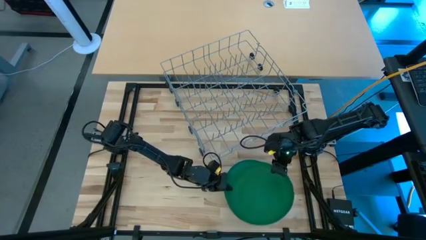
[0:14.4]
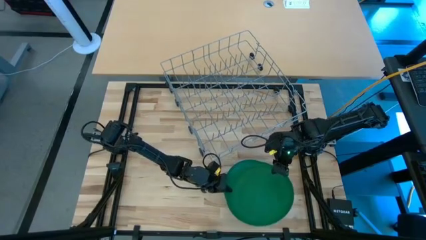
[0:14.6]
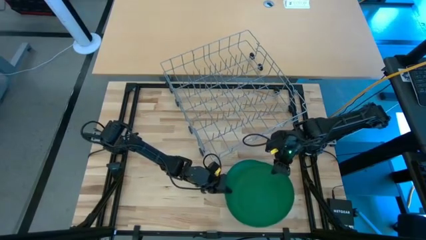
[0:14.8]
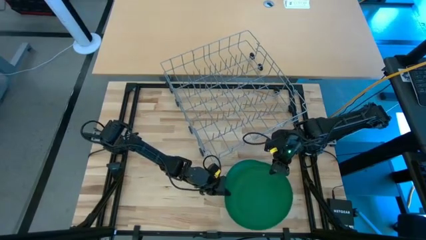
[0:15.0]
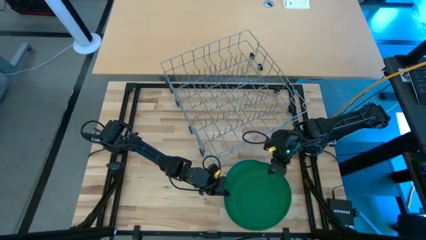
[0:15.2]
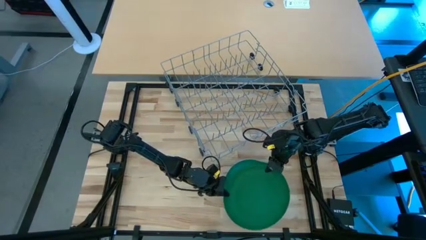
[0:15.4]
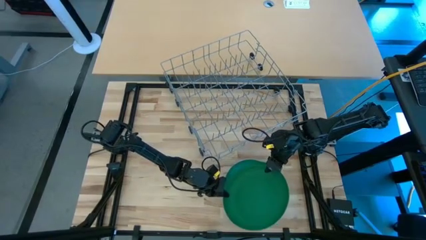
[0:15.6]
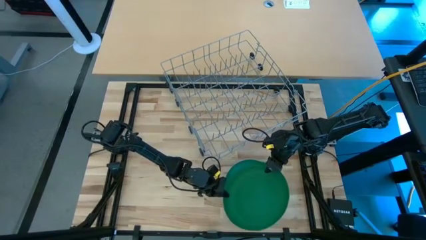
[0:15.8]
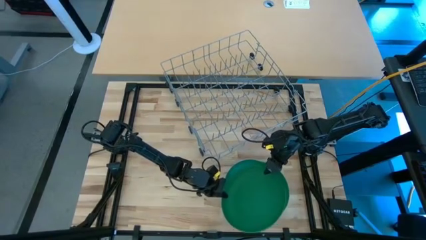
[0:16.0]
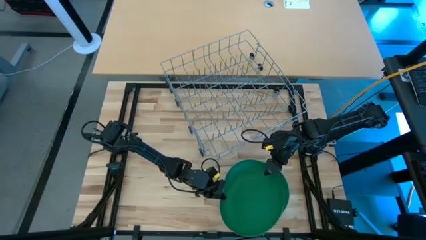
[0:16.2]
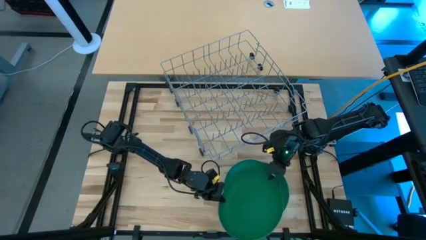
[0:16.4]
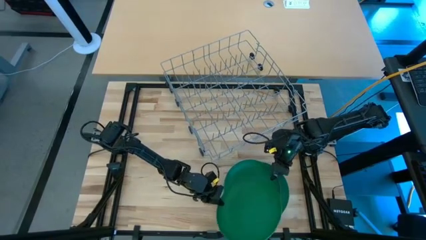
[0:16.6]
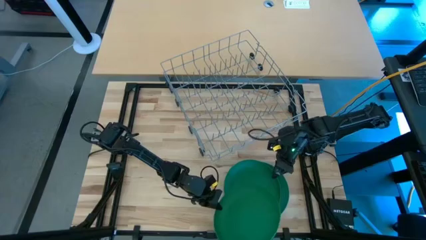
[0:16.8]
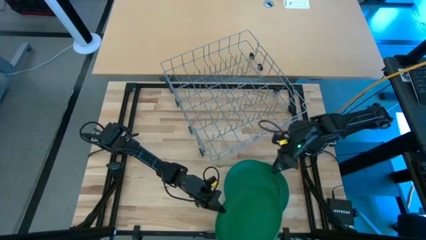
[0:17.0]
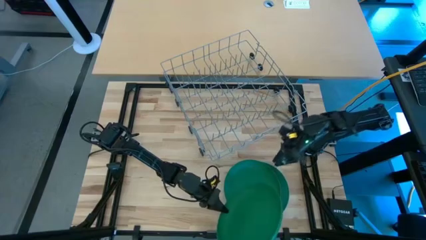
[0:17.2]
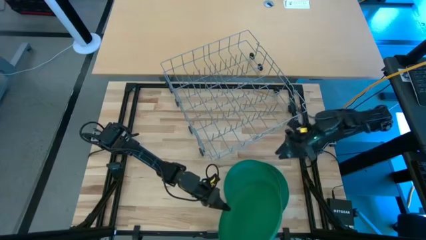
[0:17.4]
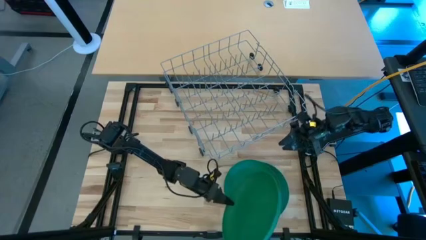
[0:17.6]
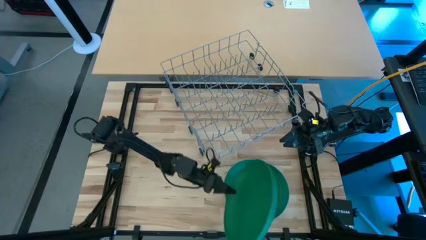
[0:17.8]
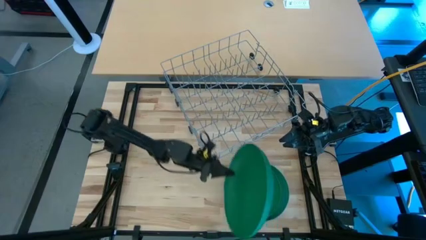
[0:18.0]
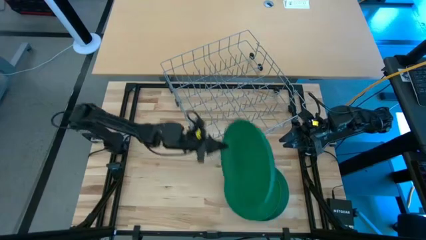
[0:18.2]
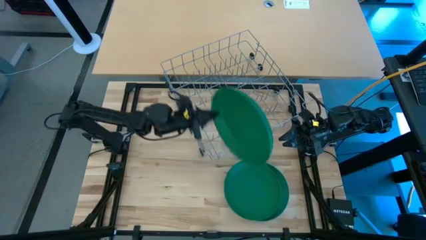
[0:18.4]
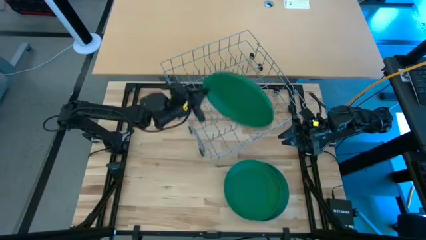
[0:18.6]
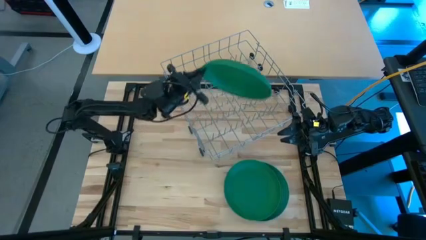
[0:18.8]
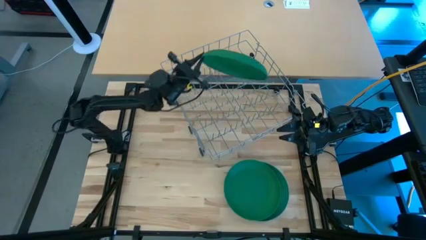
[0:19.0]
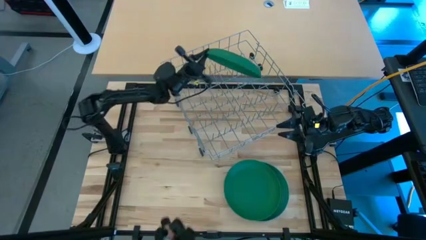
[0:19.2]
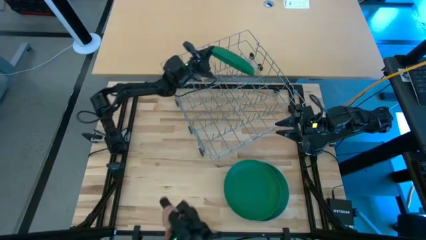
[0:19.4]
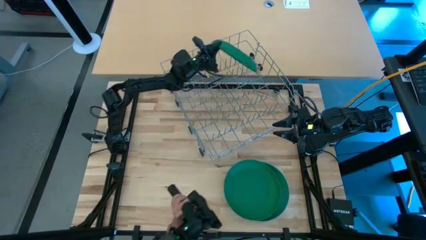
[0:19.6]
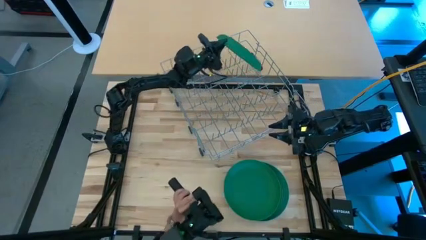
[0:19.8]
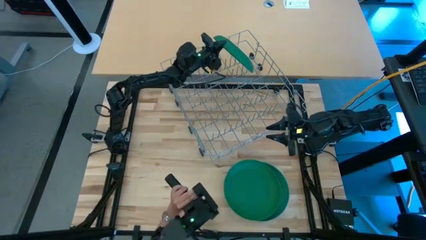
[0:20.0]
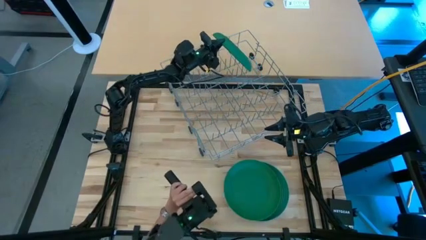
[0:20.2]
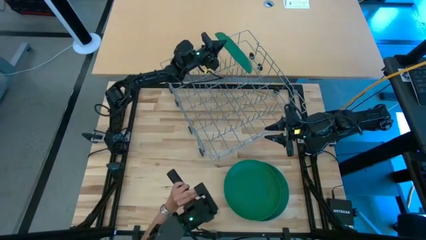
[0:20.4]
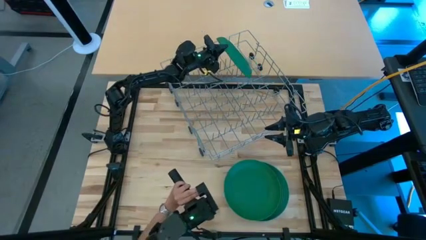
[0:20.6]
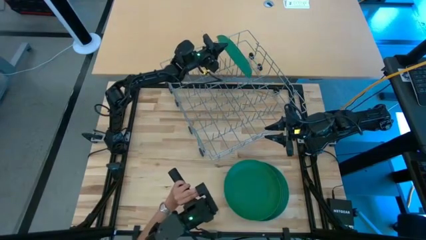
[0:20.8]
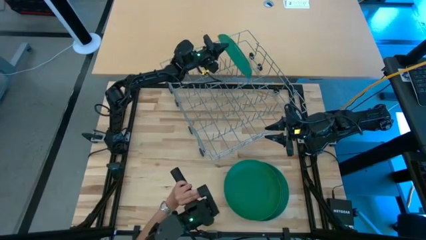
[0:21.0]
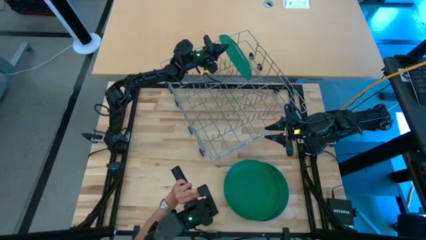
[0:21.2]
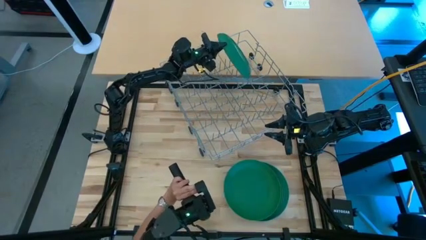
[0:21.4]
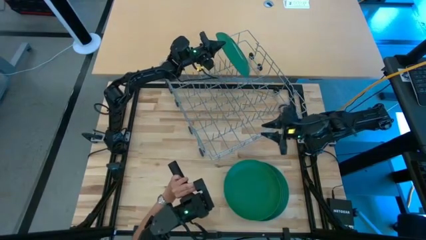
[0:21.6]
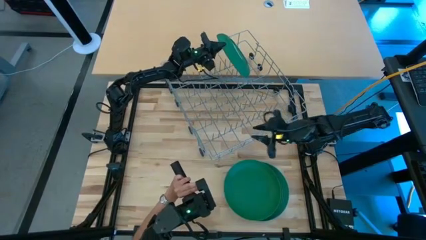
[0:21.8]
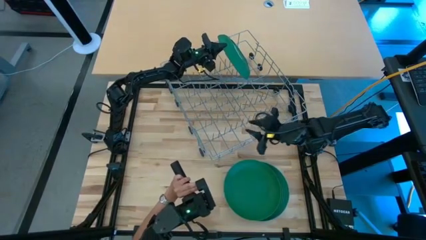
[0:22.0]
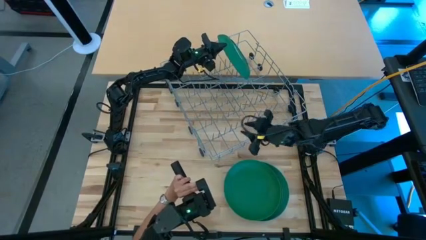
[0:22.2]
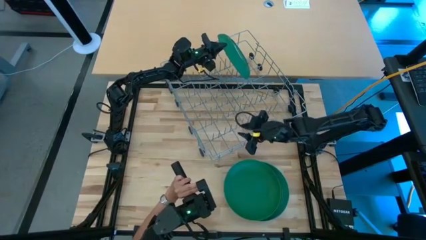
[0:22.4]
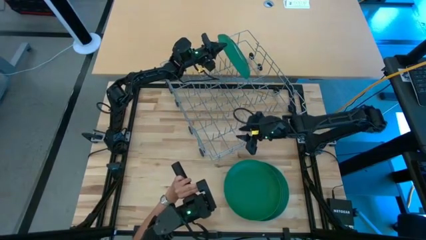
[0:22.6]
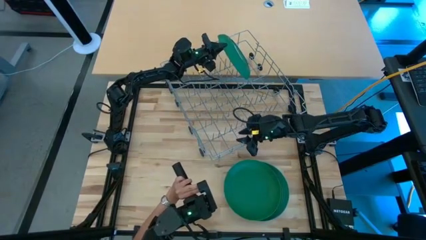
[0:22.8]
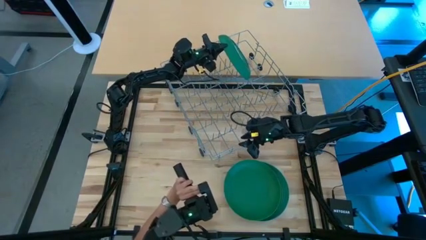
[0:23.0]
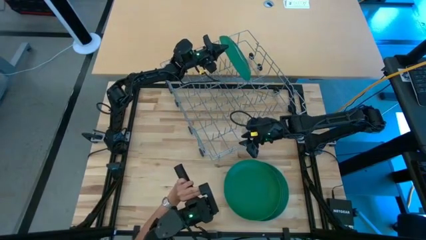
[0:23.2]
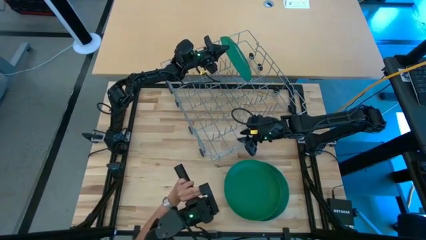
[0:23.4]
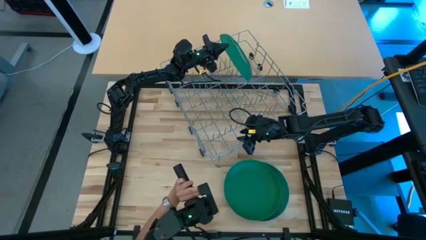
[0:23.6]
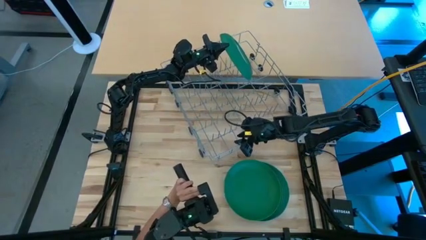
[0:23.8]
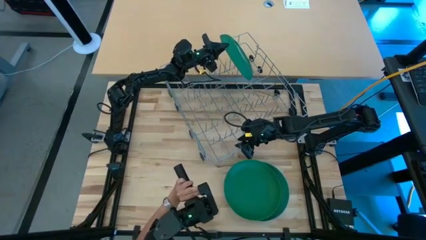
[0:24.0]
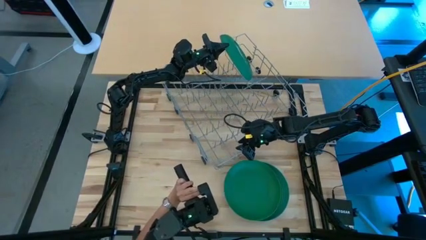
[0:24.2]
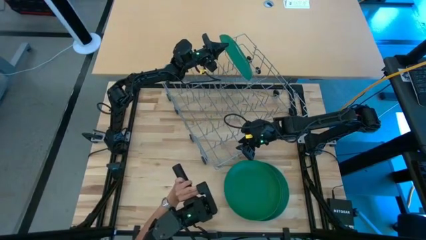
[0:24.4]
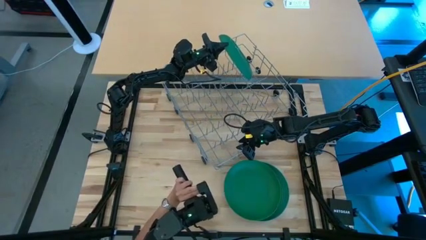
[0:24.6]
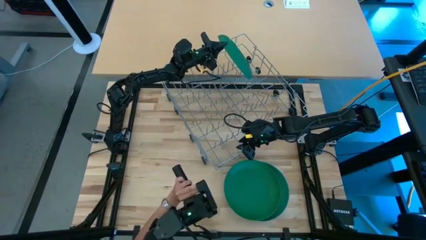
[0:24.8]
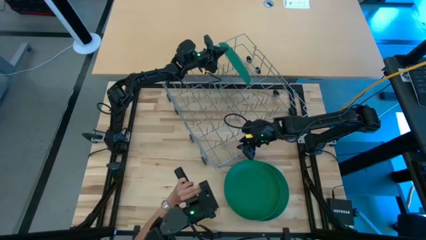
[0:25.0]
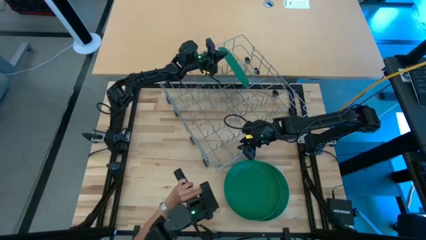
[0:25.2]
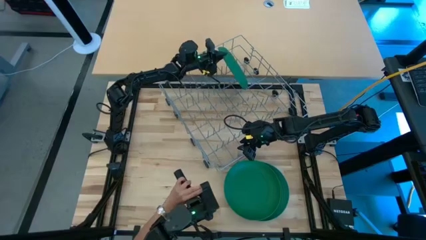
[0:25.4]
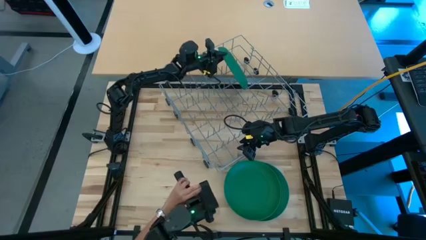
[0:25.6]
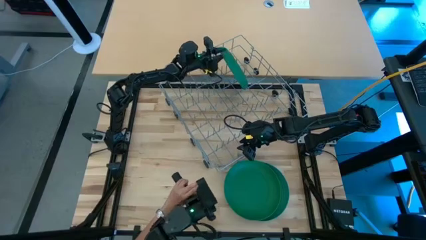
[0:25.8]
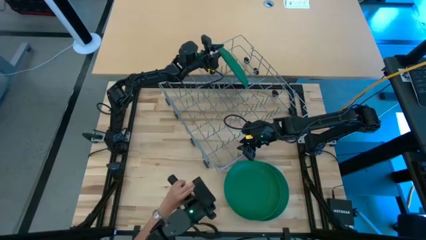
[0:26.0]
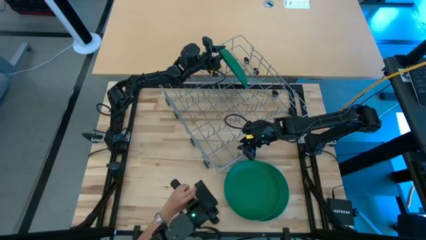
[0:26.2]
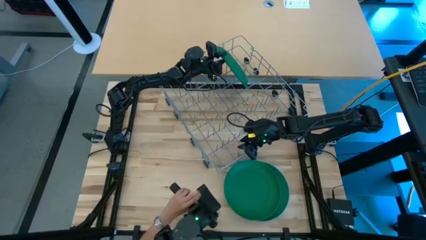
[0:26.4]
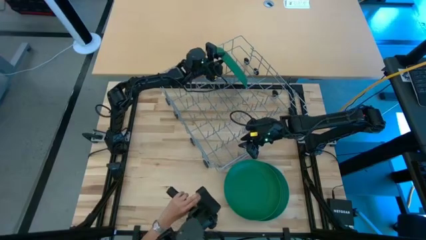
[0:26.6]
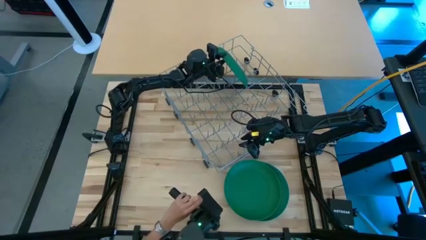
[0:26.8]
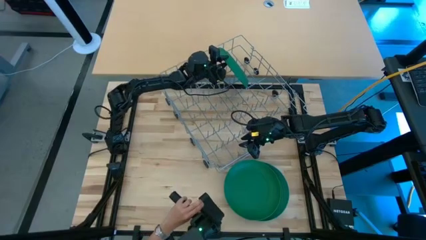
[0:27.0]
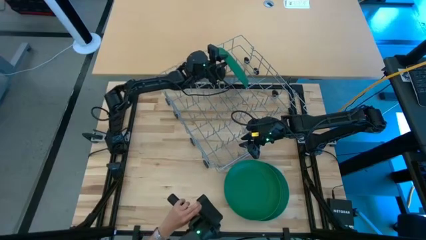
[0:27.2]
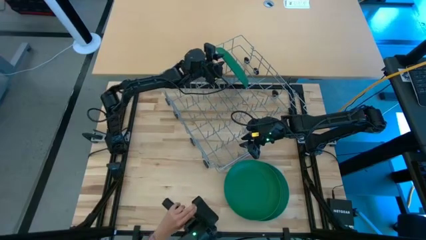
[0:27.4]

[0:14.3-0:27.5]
Task: Sort dishes
Put the green plate into the dish rack

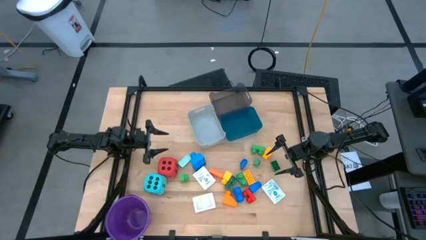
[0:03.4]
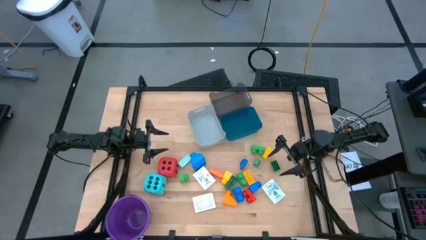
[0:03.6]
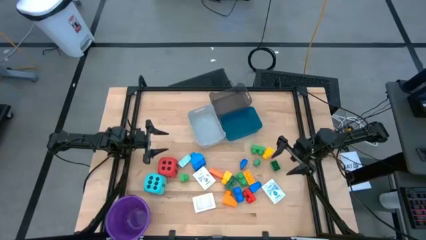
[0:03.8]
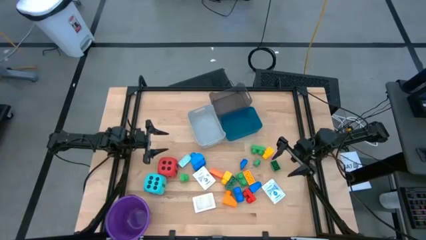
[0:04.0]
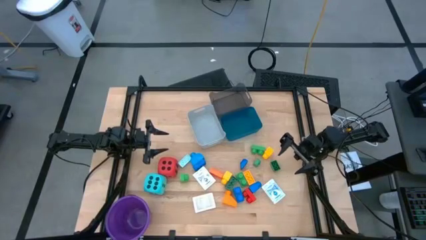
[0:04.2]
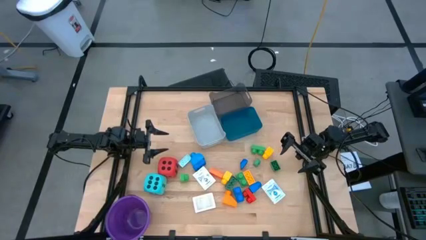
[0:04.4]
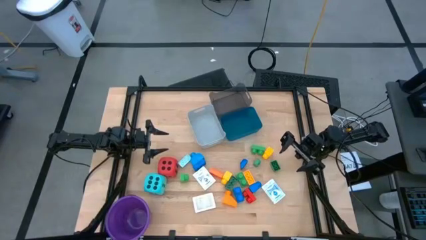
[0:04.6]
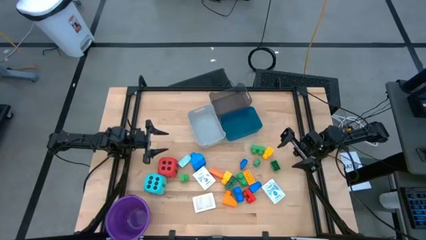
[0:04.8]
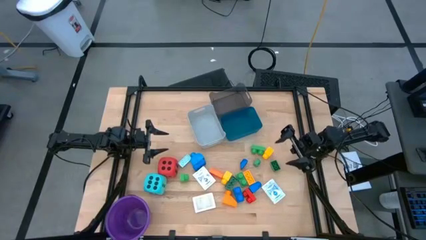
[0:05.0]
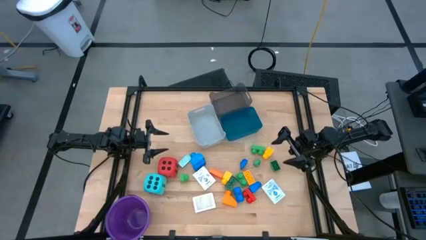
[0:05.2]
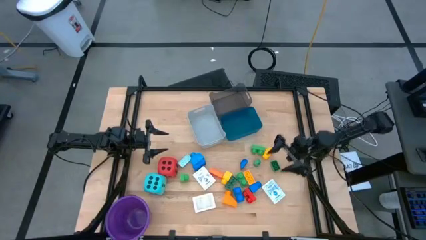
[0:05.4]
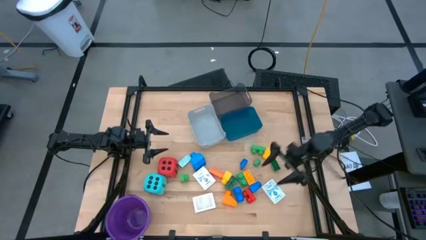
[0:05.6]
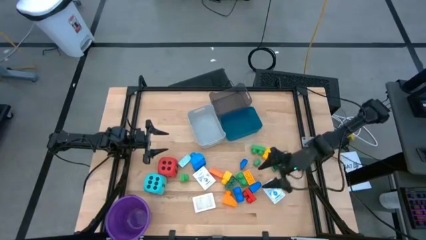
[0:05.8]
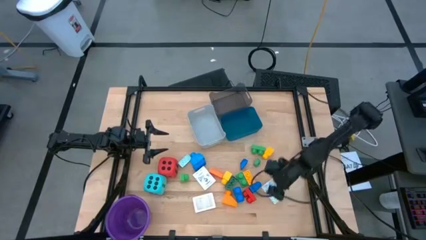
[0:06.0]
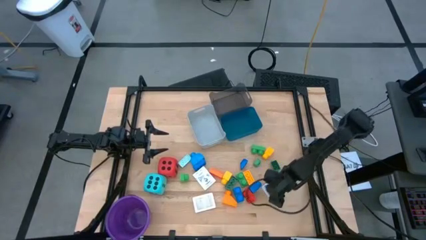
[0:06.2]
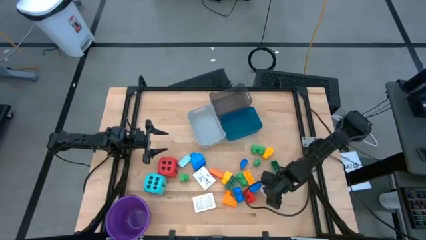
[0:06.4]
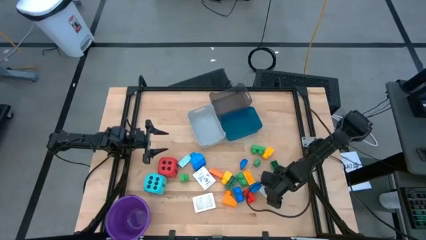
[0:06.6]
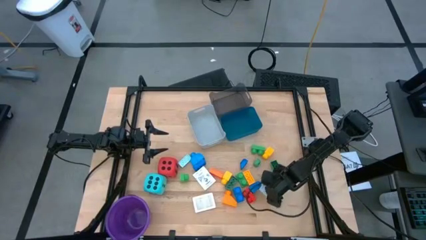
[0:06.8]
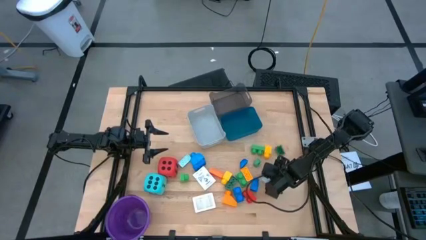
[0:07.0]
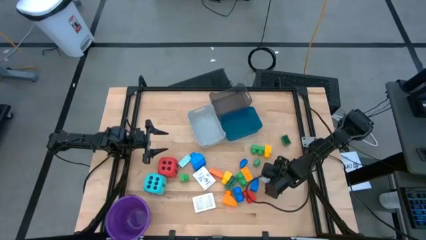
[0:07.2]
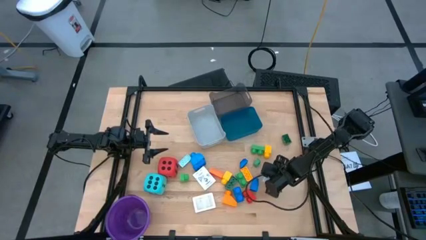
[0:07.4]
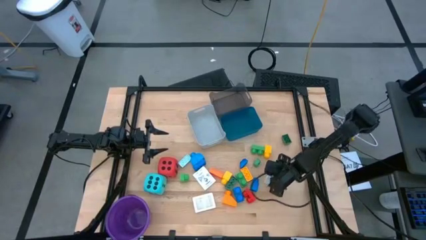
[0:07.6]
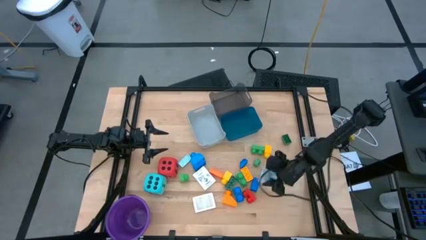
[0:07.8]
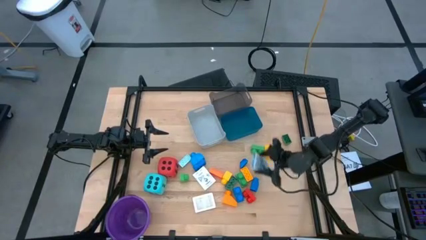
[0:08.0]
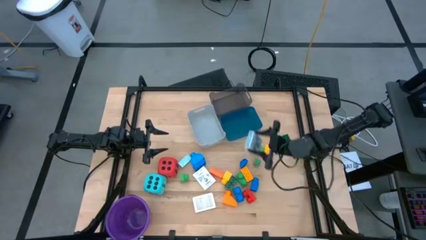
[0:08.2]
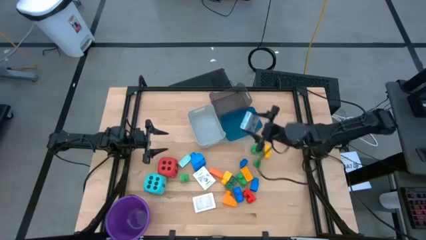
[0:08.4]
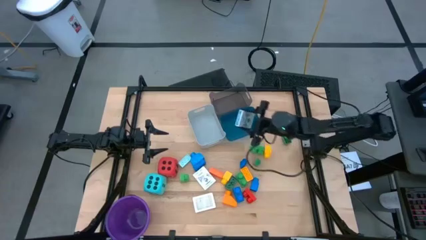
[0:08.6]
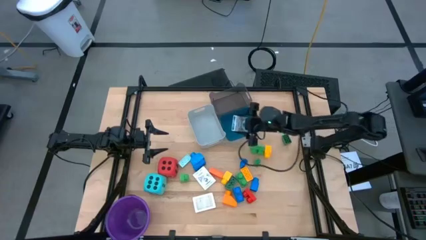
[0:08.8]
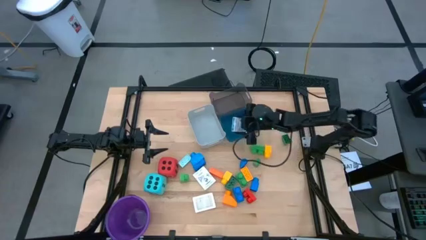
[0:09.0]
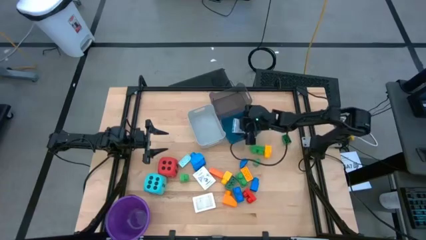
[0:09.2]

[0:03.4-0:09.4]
Task: Pick & Place Toys
Put the blue deck of cards into the blue bin
